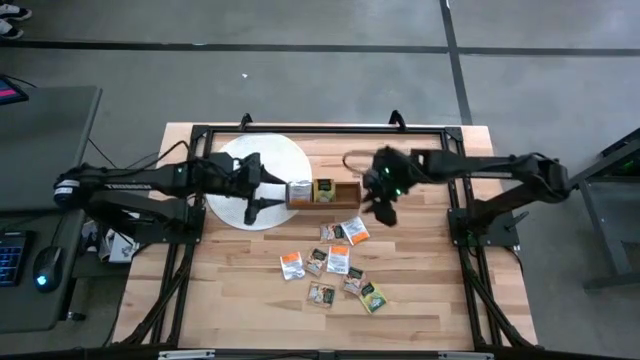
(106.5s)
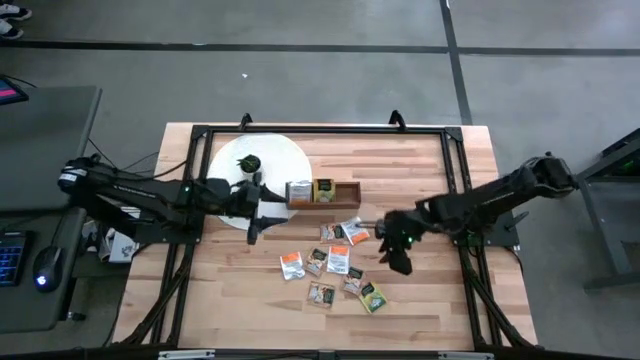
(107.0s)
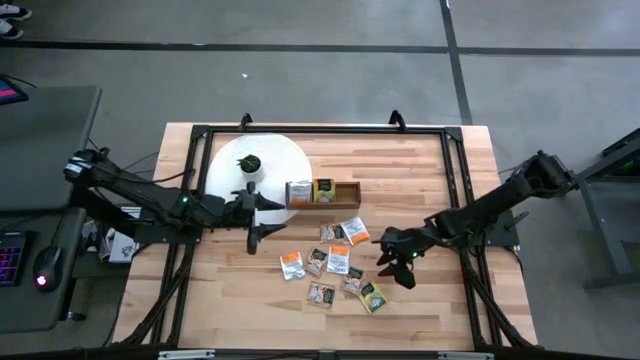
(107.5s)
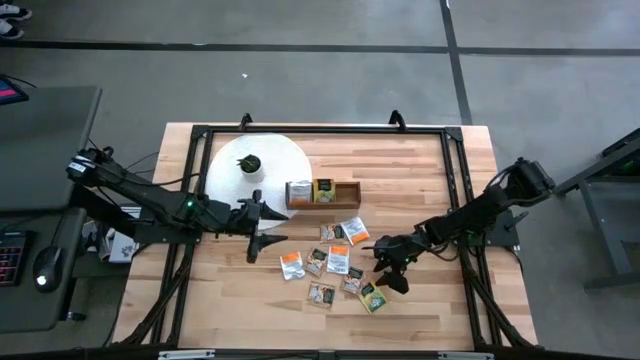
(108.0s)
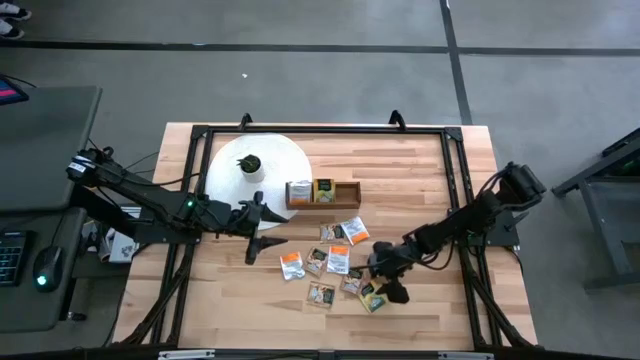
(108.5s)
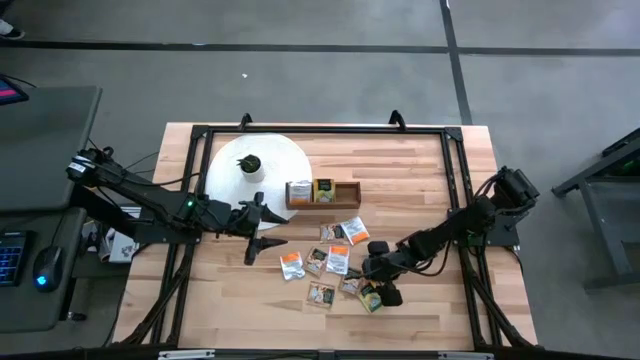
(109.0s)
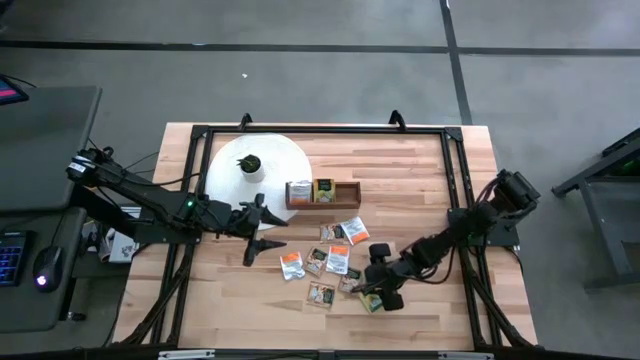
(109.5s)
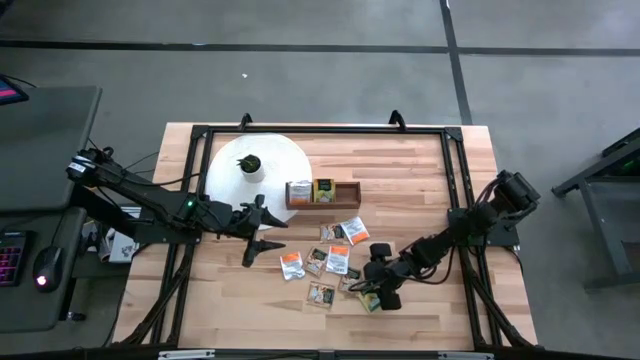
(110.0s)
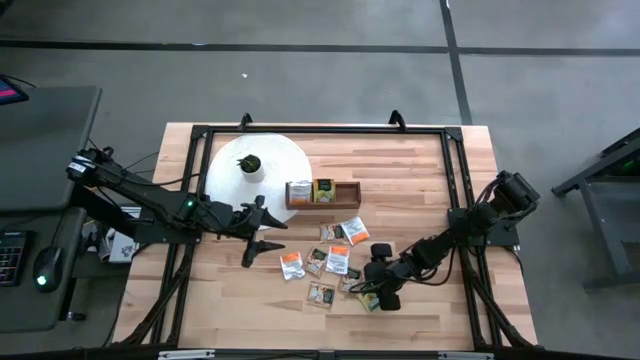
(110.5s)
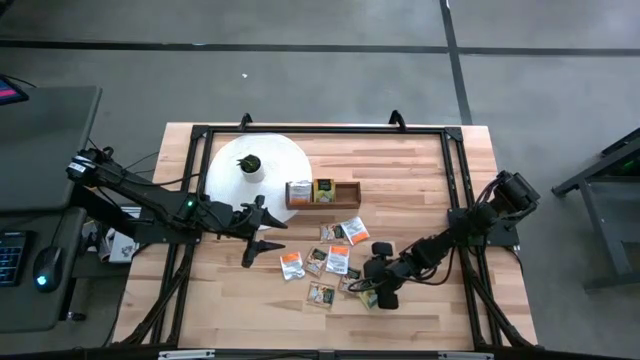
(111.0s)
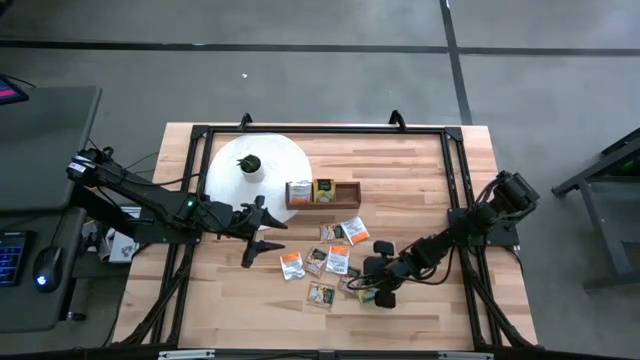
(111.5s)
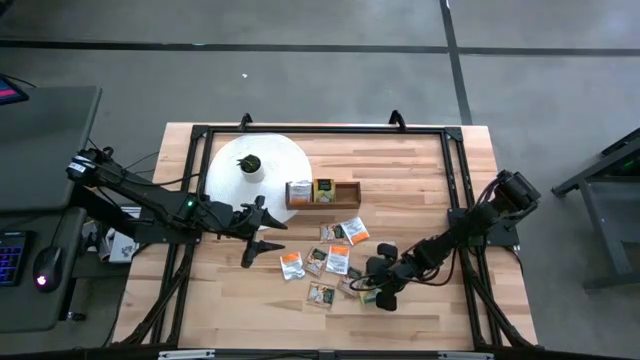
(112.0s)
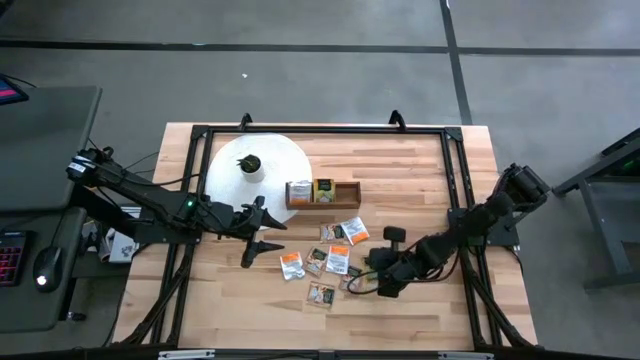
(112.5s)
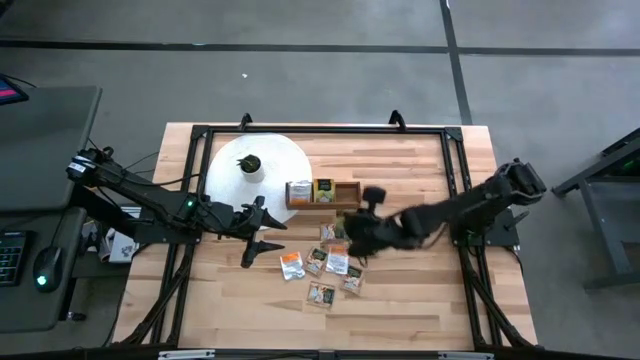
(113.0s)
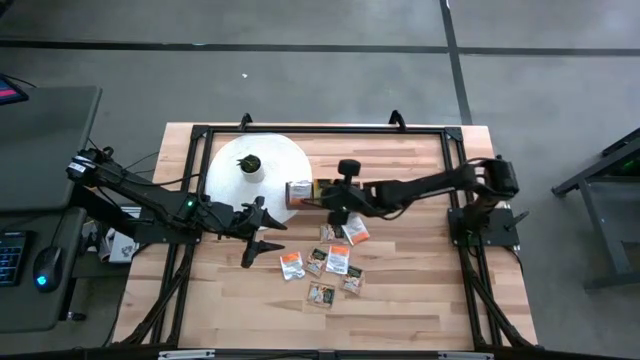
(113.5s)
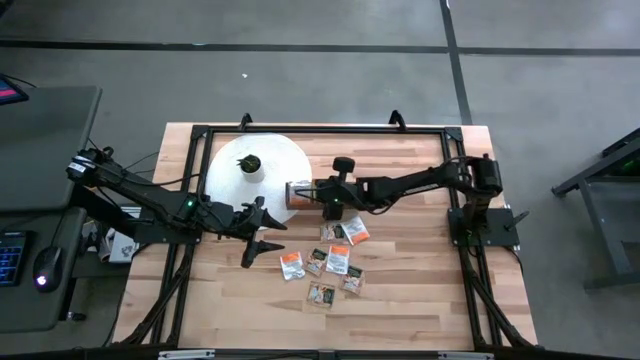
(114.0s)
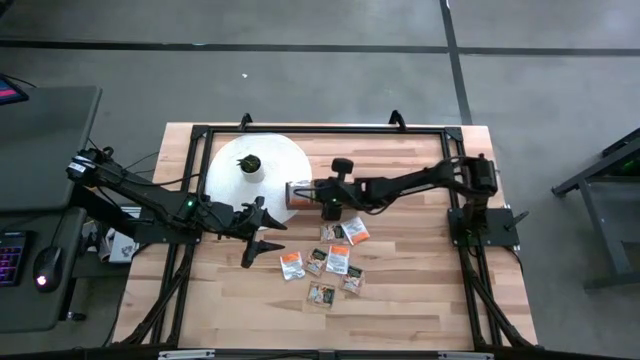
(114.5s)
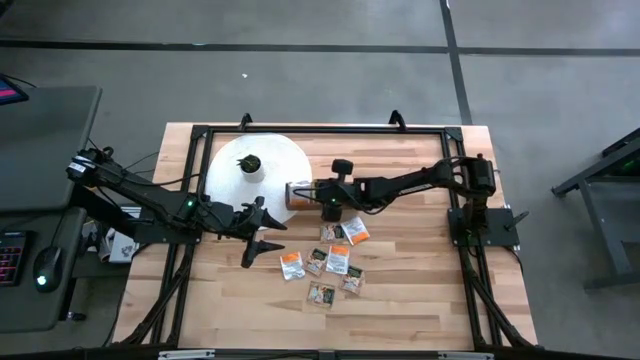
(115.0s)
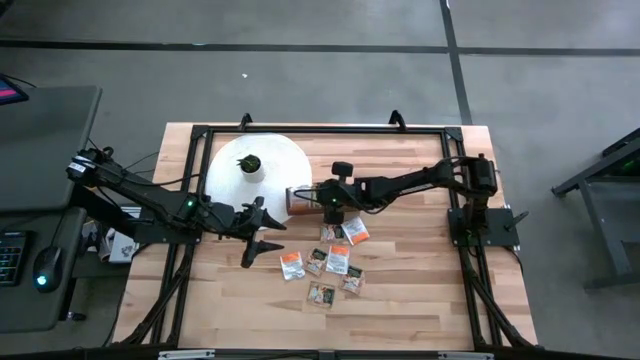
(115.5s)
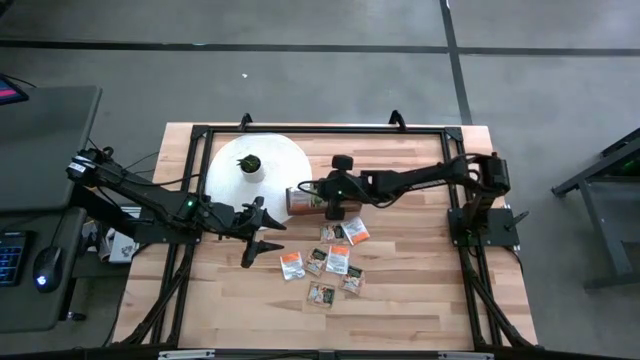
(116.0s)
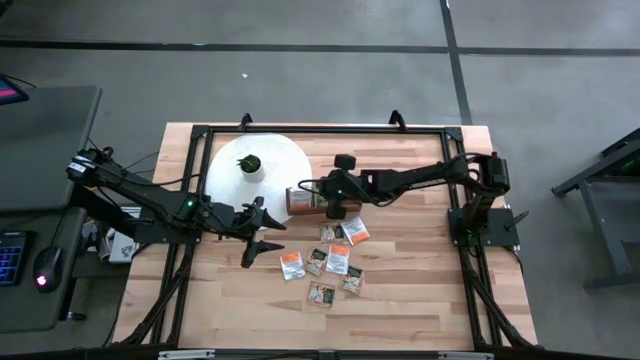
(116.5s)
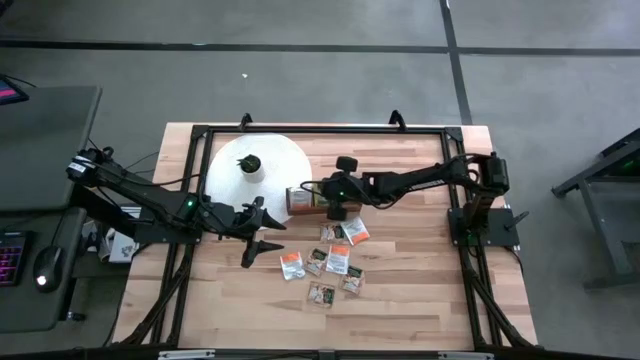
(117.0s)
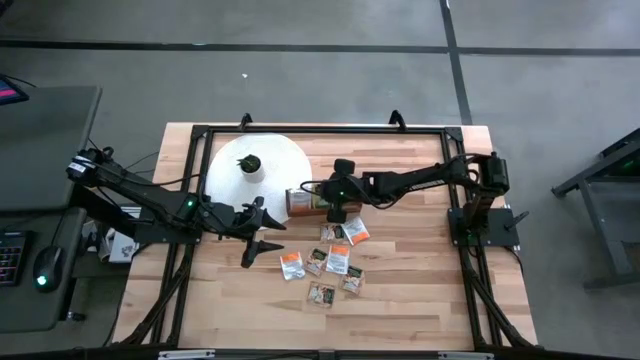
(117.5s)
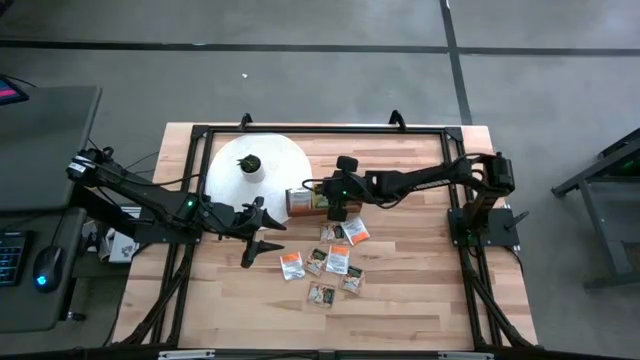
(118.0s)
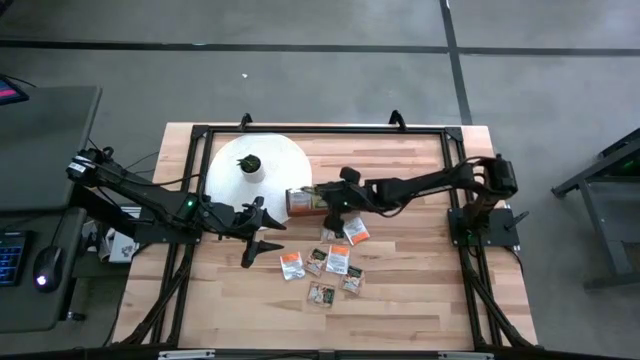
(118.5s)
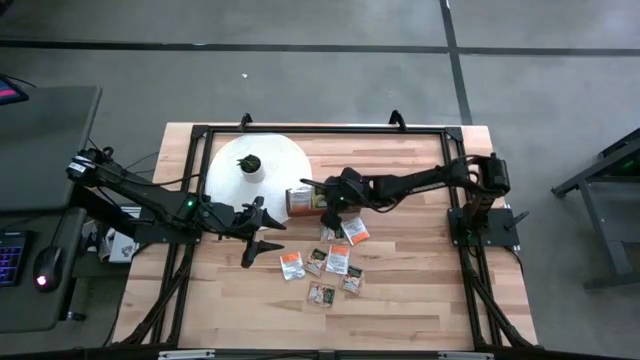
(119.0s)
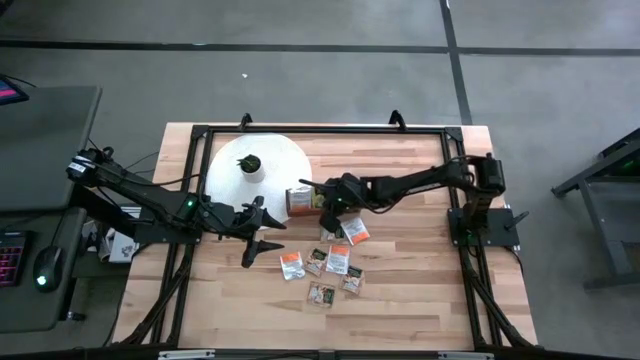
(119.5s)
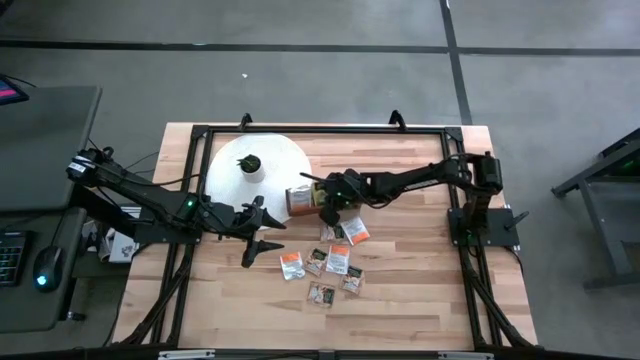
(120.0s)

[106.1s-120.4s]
Task: Pick & Place Tea
Put the yellow tea bag into the middle section of the wooden organizer

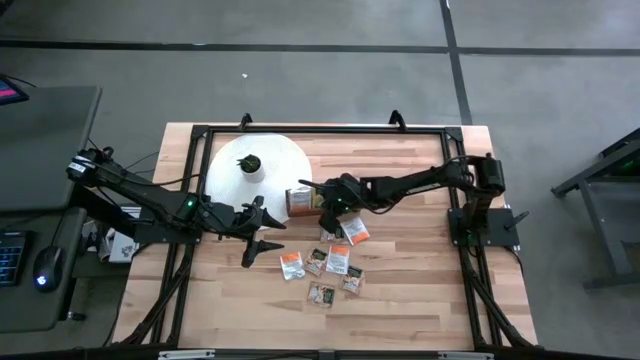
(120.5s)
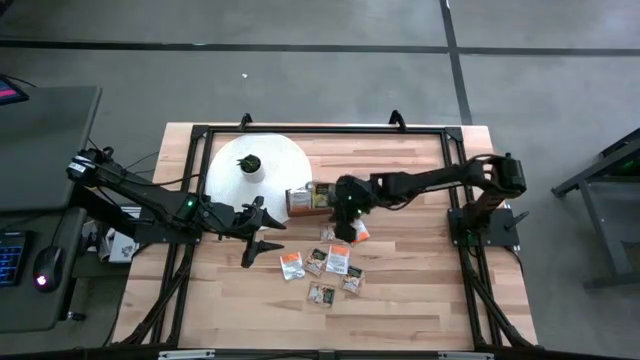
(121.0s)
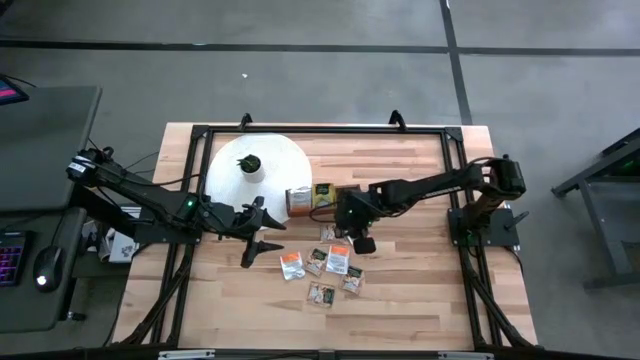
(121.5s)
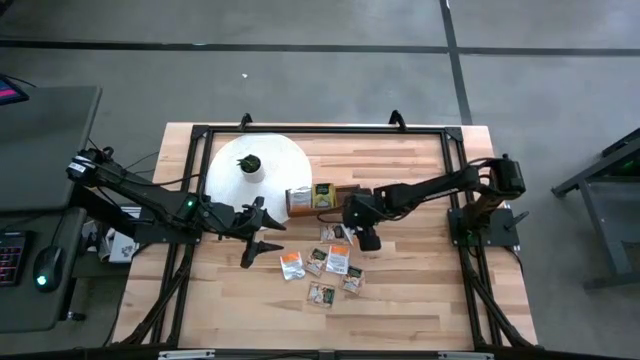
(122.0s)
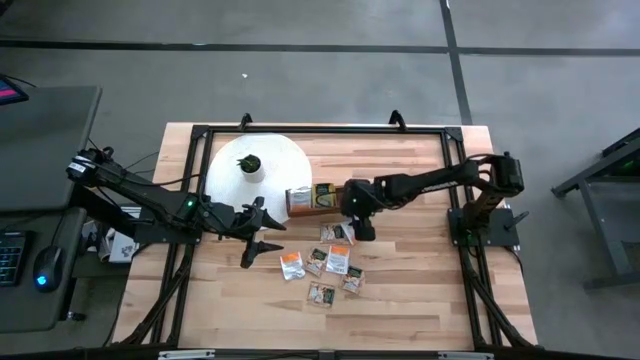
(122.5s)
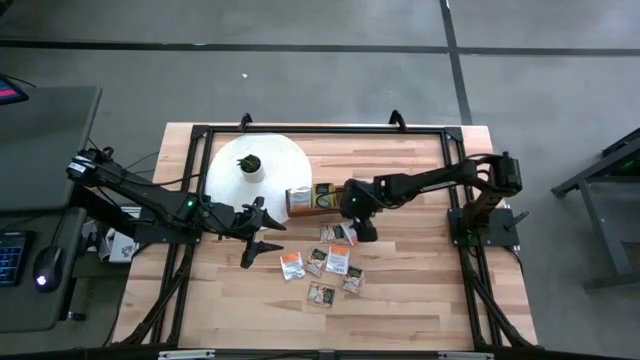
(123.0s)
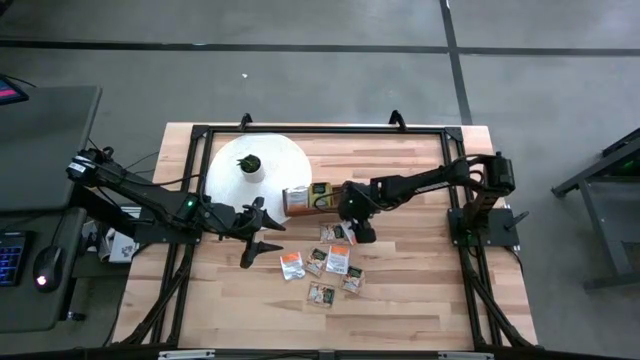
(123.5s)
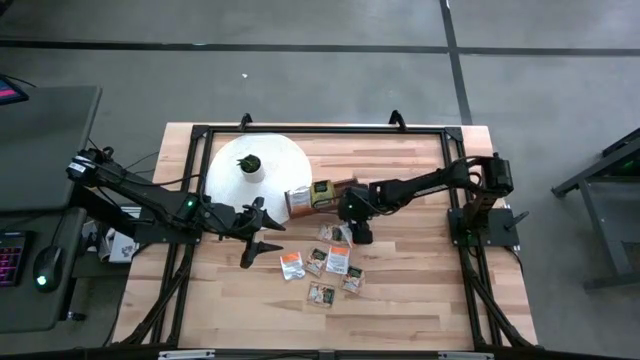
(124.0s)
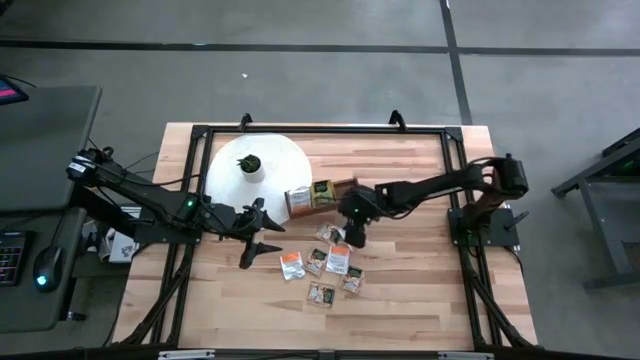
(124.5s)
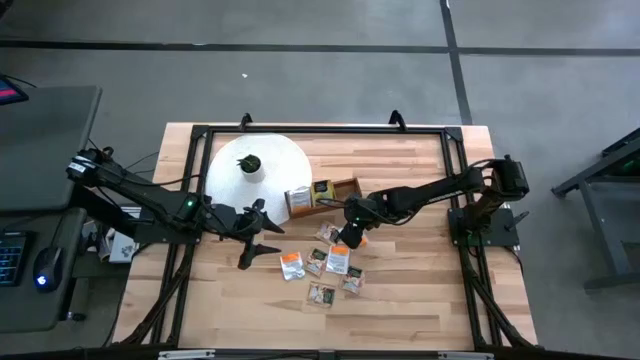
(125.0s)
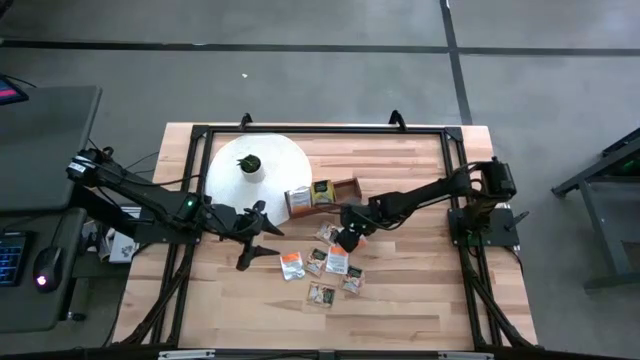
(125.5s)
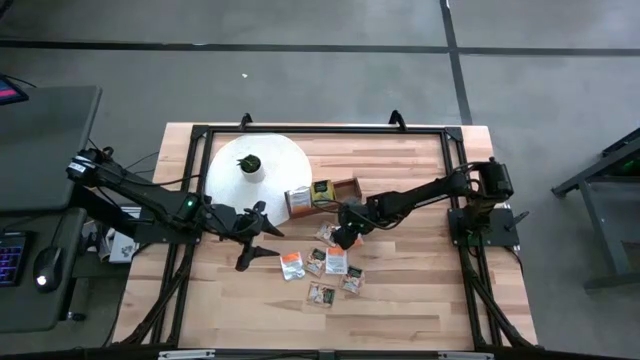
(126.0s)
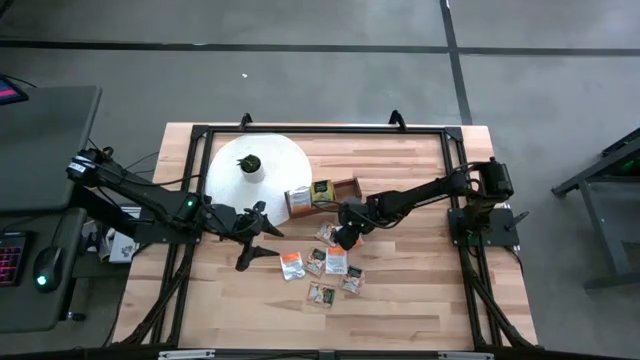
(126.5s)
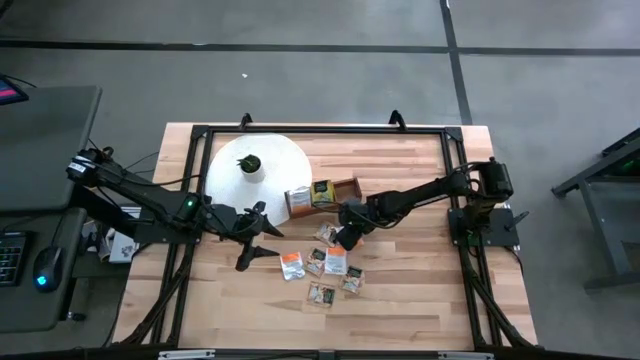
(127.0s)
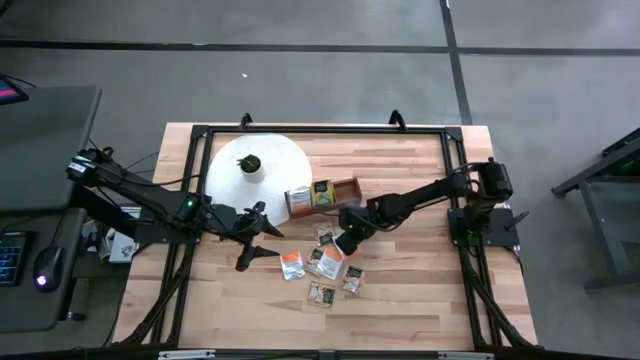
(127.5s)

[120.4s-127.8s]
Put the white tea bag into the left section of the wooden organizer

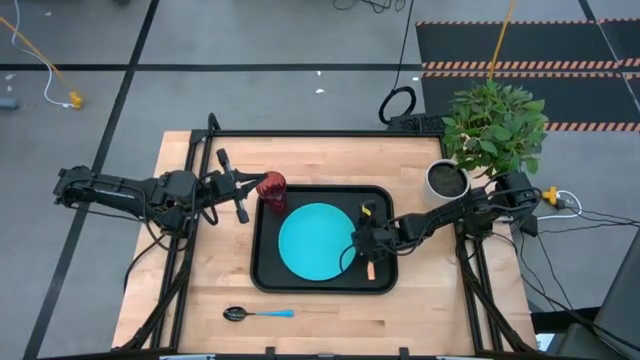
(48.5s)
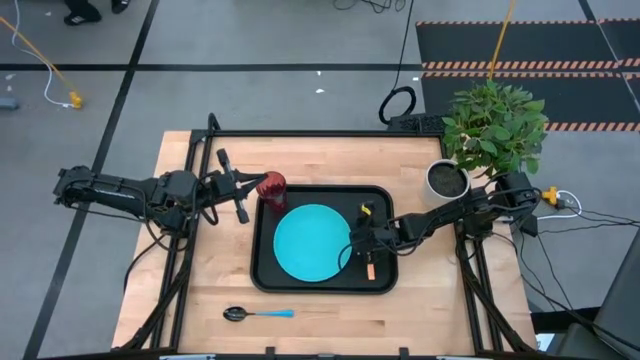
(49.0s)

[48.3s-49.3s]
Task: Pick and place plate/cup/fork/spoon on tray
Adjust the blue plate on the black serving tray
